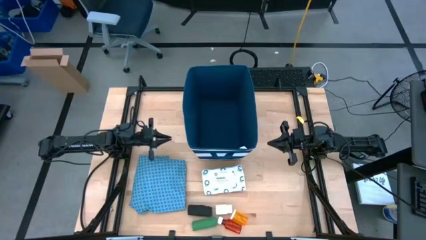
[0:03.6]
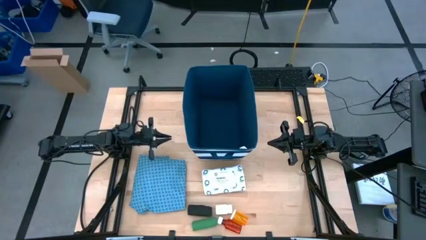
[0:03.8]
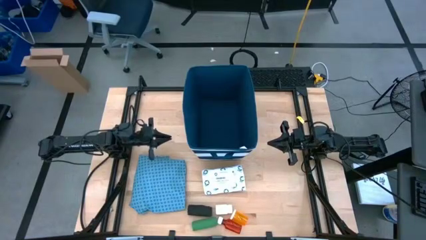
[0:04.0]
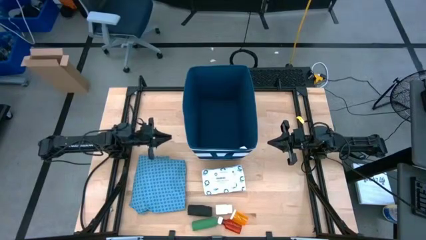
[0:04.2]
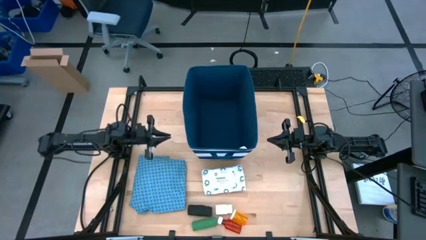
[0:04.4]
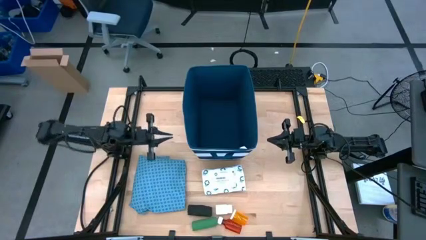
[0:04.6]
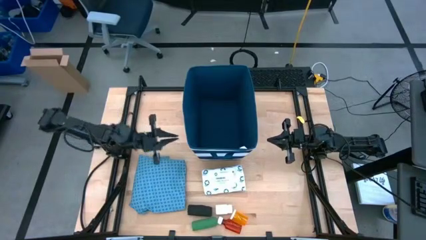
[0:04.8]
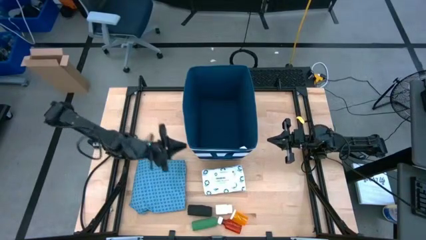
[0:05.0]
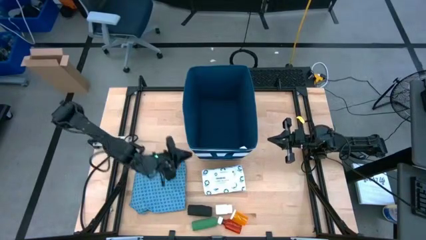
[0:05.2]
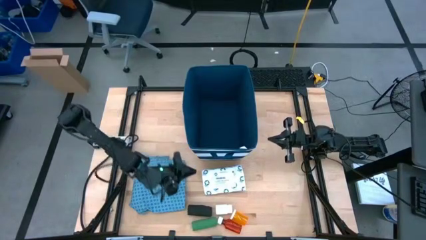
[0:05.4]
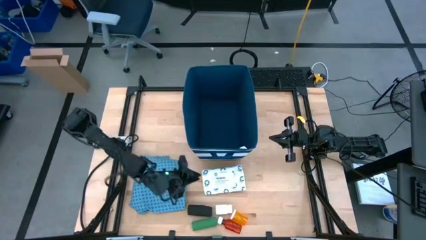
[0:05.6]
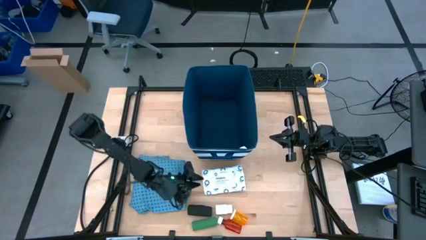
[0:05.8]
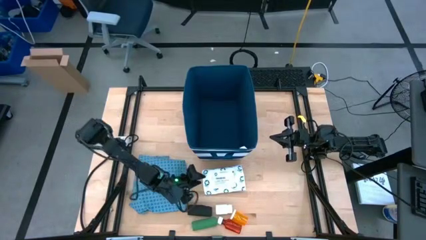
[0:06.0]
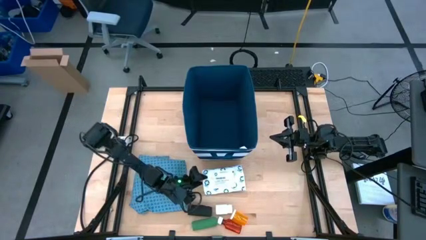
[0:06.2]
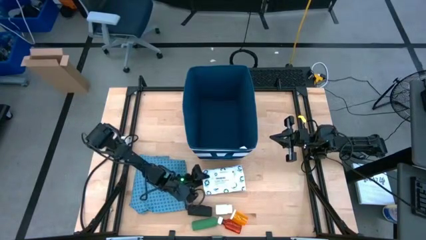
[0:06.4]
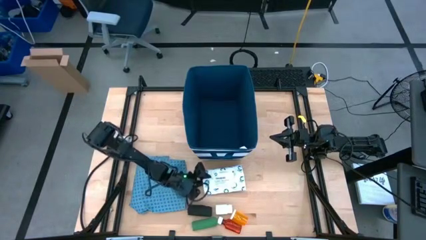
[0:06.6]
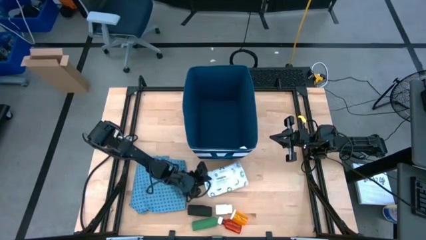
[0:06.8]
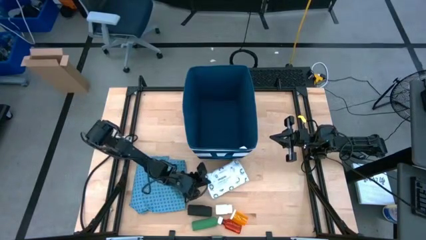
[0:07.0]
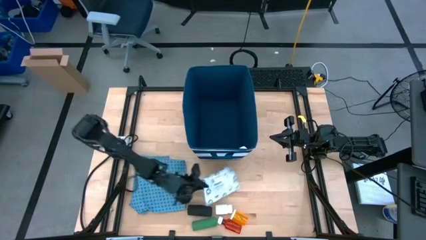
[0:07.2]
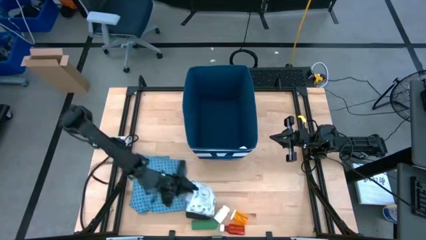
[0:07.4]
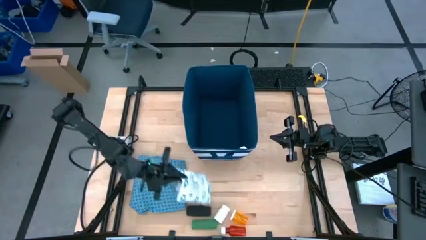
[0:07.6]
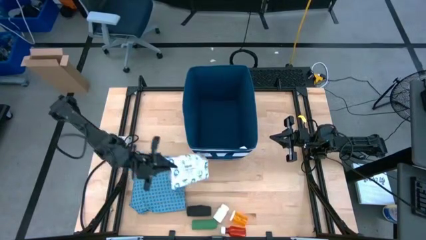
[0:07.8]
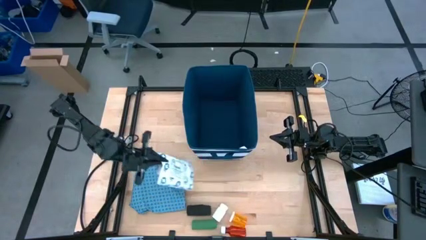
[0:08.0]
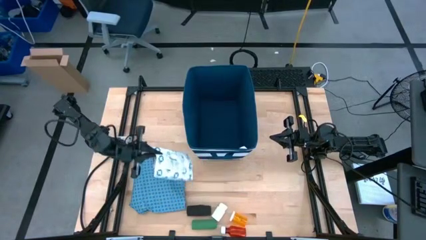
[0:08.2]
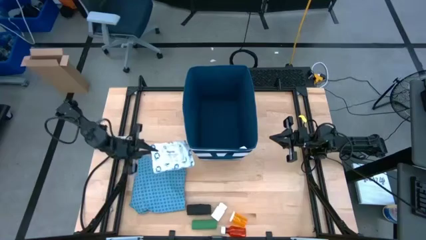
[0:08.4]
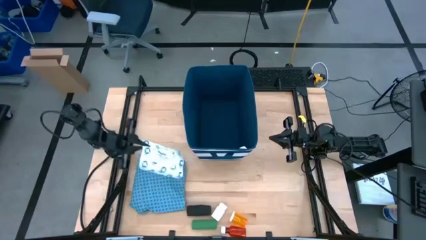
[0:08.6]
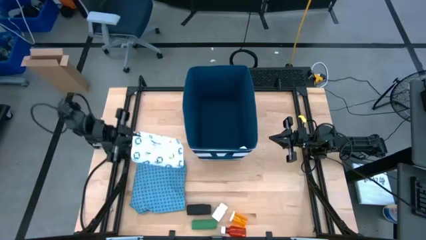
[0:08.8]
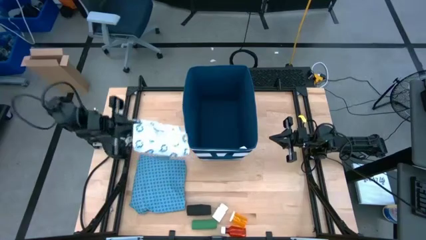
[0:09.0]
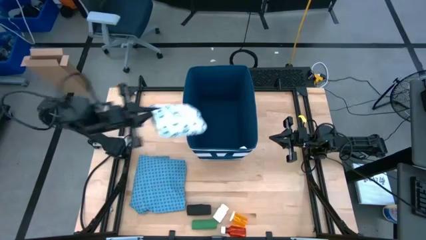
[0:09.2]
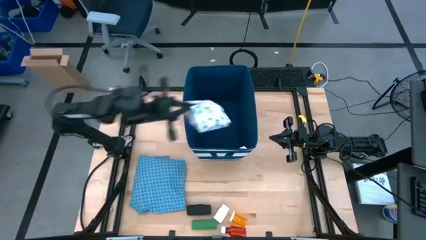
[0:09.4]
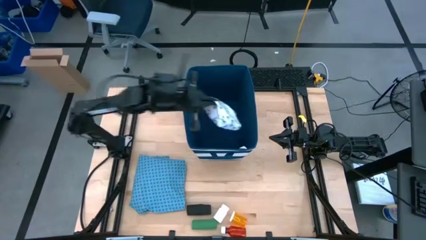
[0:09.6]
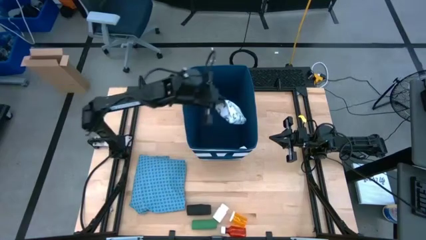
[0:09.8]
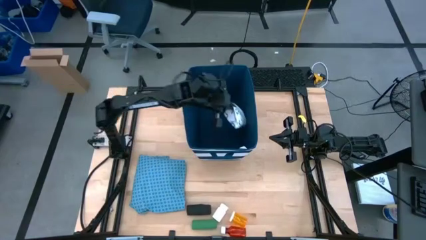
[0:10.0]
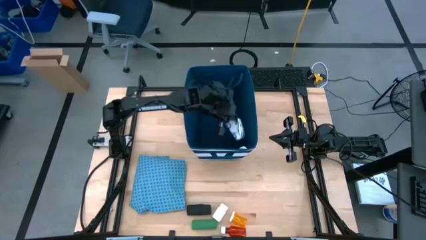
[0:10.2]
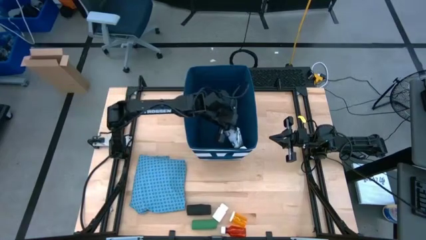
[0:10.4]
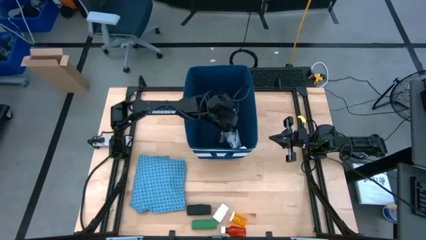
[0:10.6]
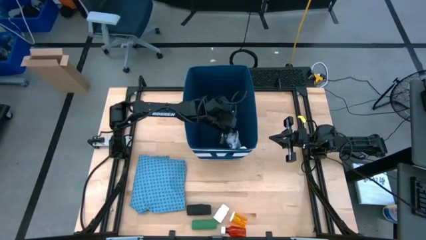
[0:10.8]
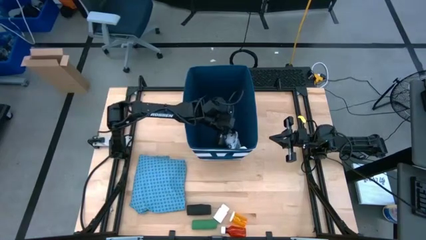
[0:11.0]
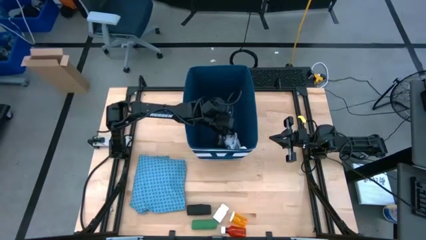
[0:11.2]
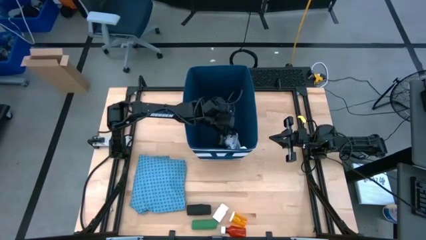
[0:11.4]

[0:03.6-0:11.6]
Task: Pick & place medical supplies in basket/bin
Put the mailer bag into the blue bin

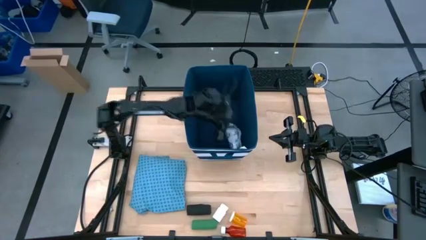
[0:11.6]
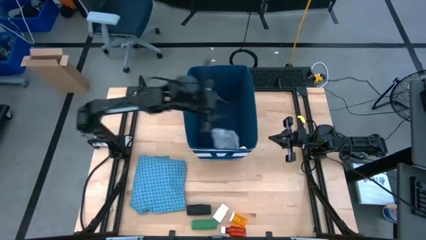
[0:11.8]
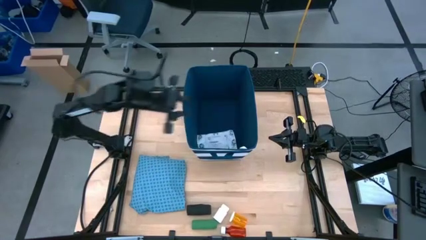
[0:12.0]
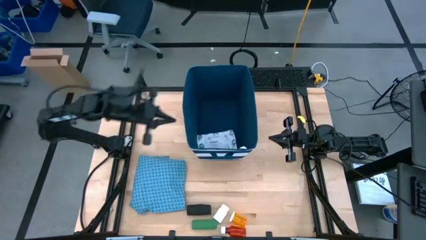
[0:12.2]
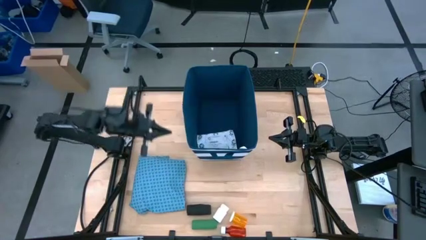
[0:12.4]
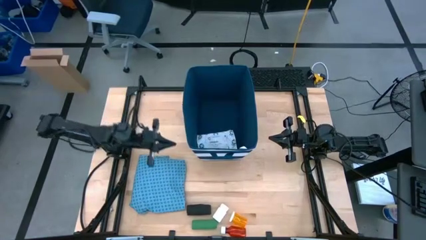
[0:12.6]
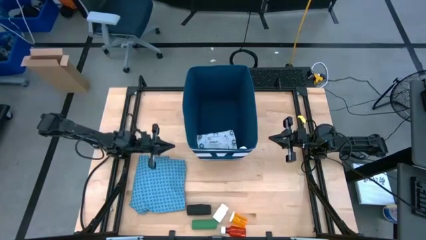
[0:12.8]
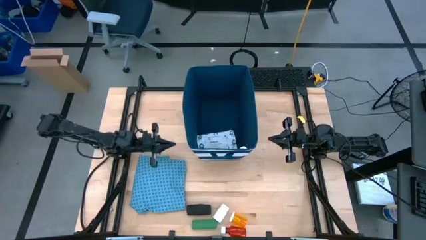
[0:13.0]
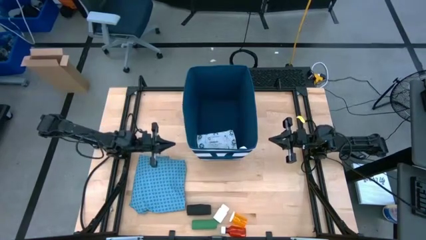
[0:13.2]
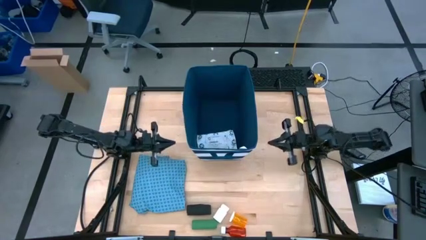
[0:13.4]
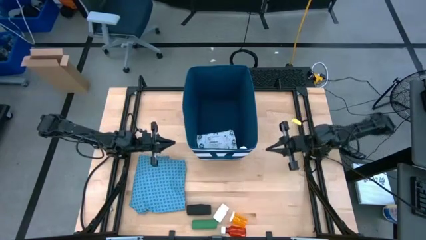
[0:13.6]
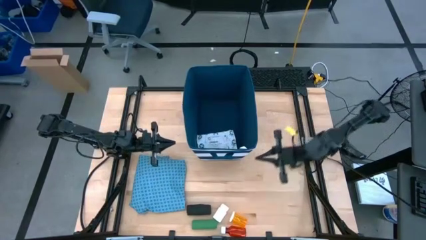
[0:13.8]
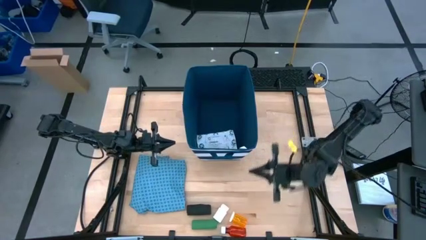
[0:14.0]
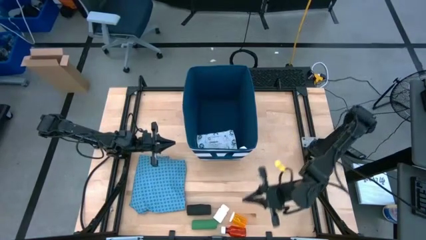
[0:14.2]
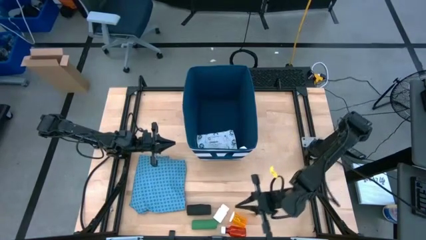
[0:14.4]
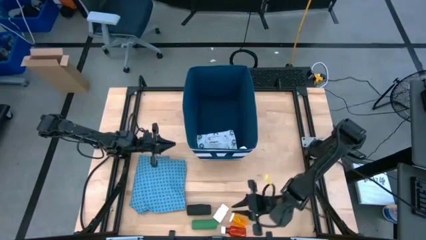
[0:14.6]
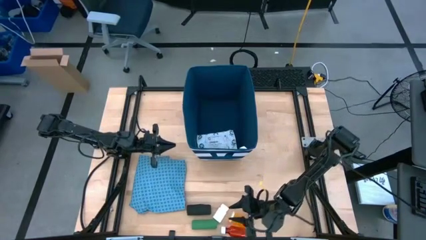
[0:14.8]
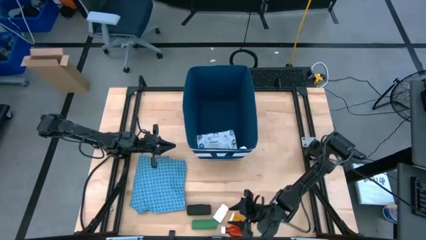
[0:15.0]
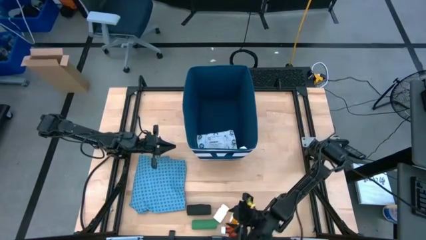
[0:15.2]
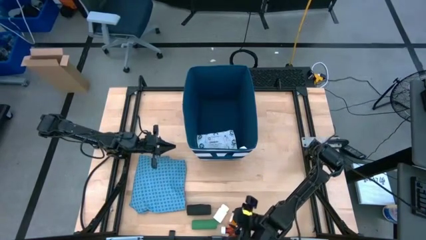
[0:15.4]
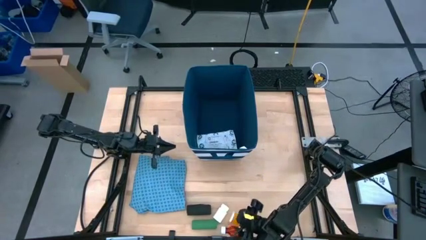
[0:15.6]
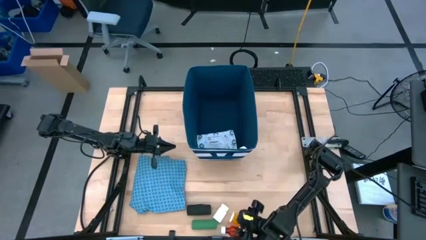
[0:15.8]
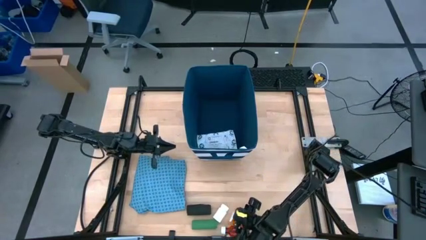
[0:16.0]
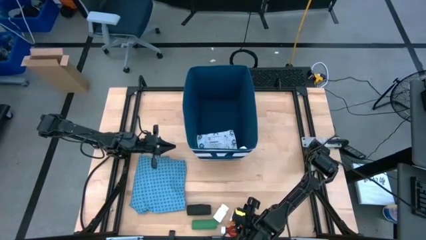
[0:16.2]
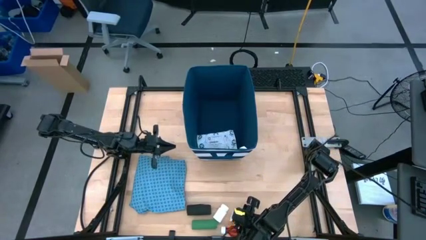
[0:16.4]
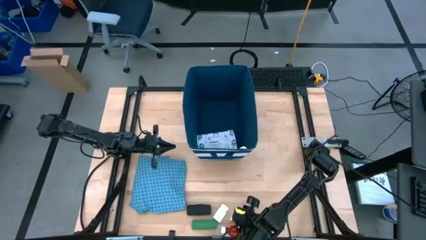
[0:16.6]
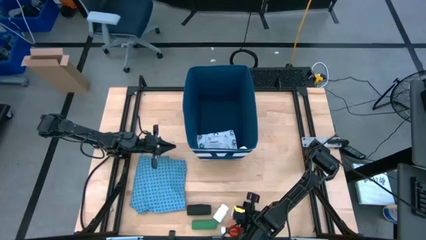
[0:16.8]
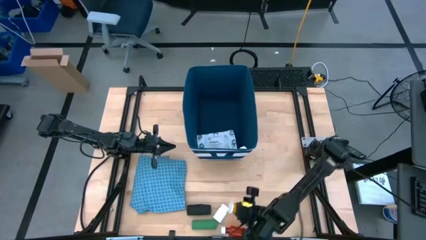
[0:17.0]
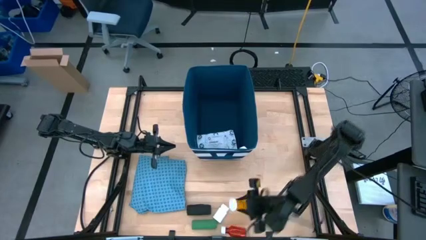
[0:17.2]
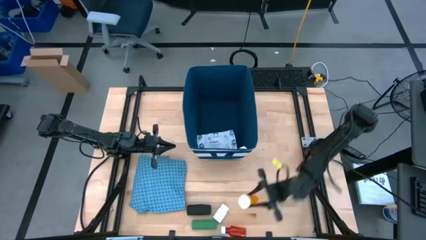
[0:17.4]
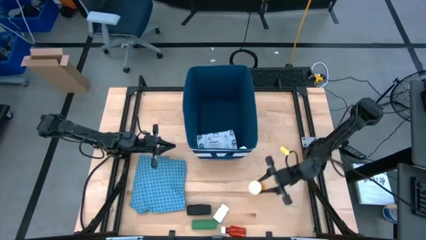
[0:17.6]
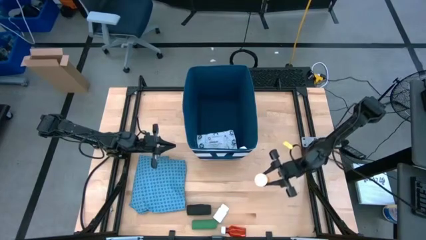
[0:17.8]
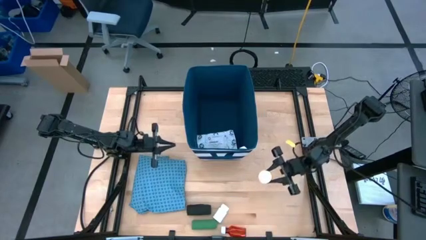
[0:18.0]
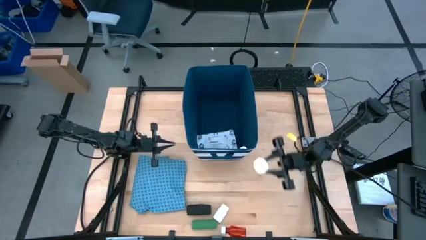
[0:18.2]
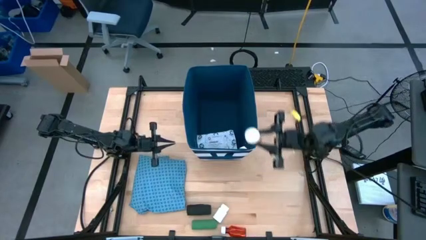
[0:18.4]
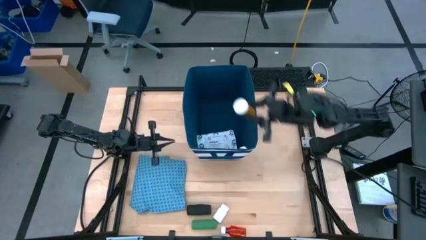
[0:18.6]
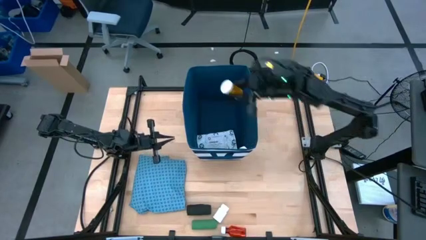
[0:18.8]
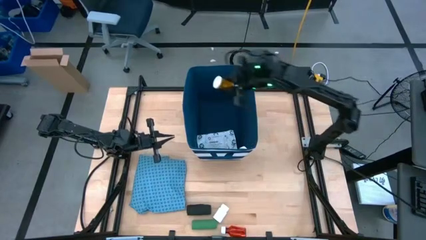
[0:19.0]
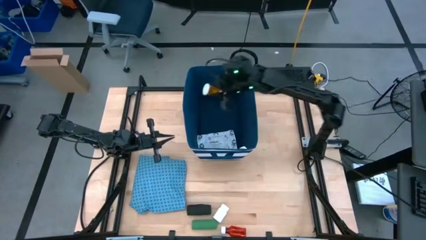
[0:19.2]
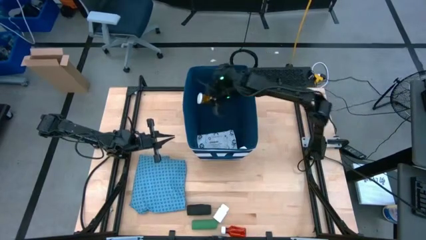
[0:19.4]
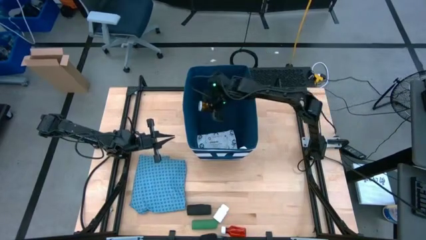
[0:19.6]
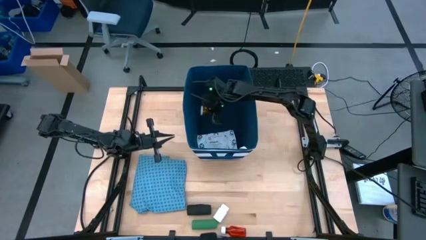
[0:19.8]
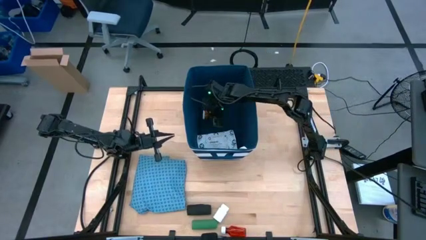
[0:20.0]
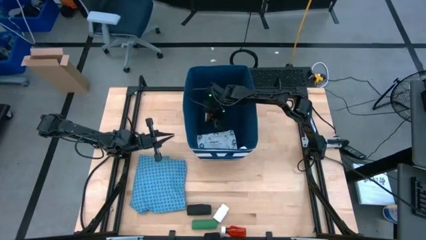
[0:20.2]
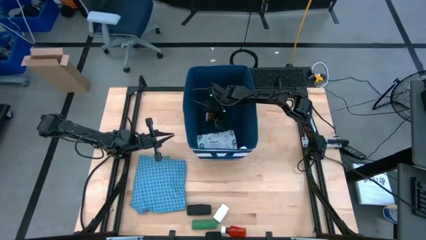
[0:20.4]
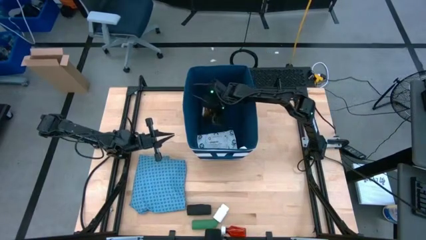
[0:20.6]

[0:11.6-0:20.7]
Put the orange pill bottle into the blue bin
